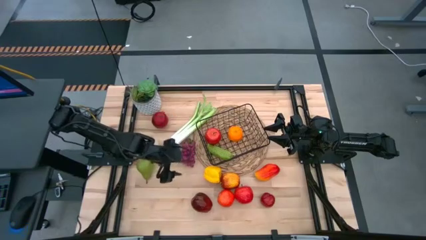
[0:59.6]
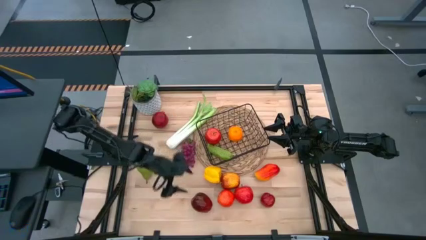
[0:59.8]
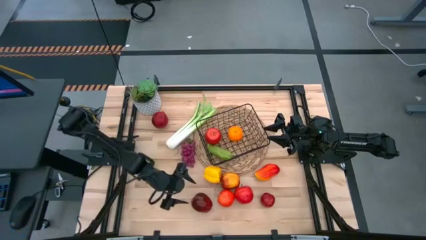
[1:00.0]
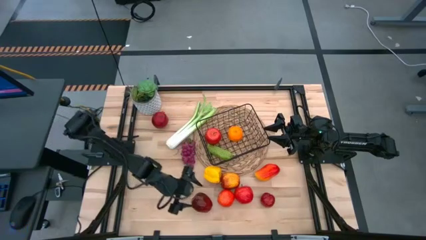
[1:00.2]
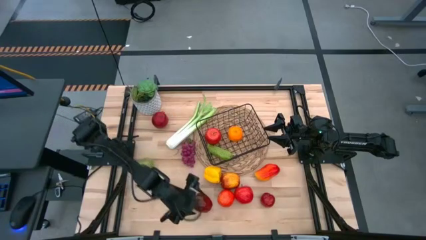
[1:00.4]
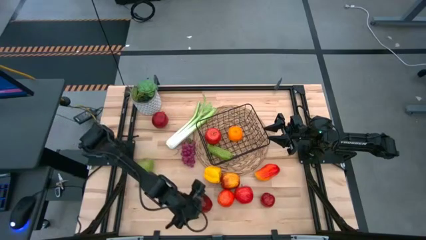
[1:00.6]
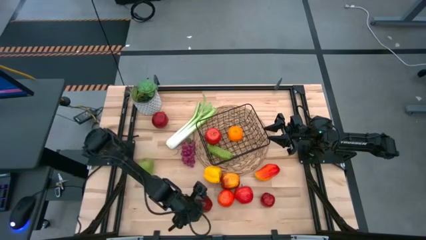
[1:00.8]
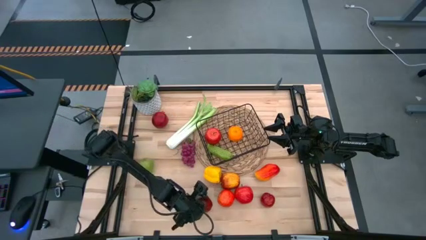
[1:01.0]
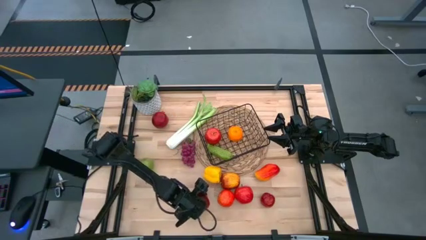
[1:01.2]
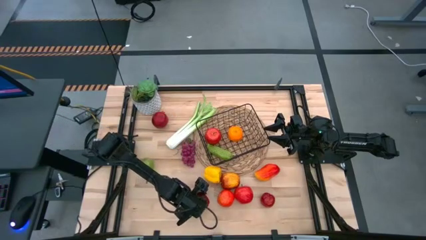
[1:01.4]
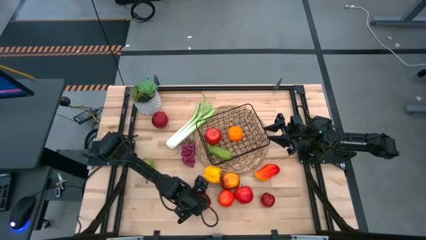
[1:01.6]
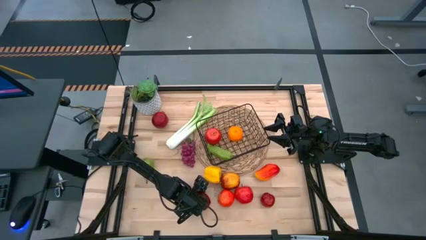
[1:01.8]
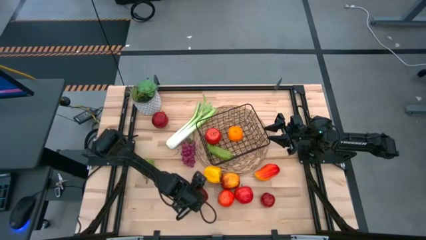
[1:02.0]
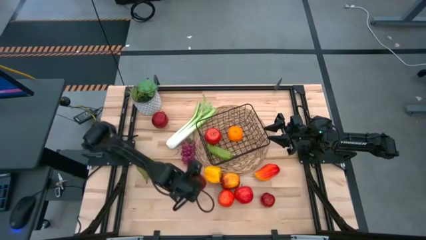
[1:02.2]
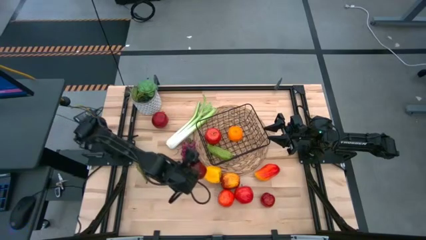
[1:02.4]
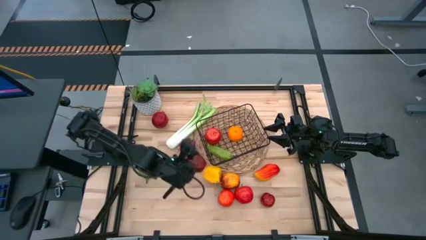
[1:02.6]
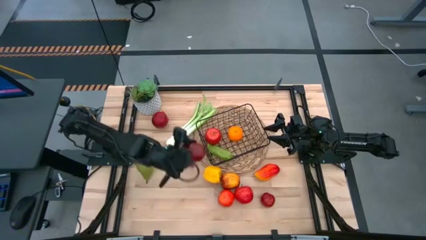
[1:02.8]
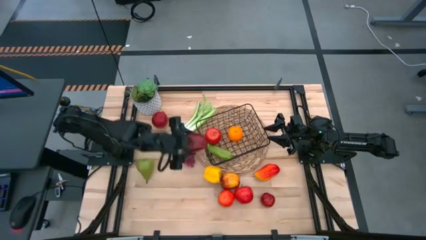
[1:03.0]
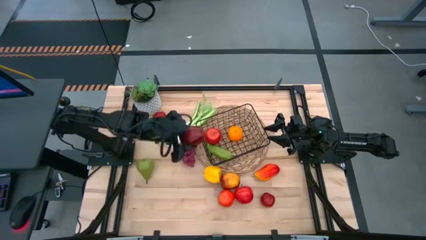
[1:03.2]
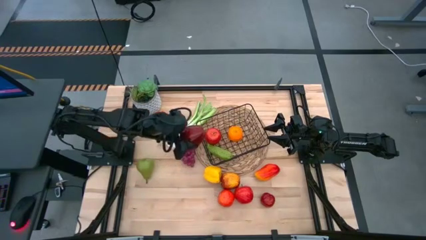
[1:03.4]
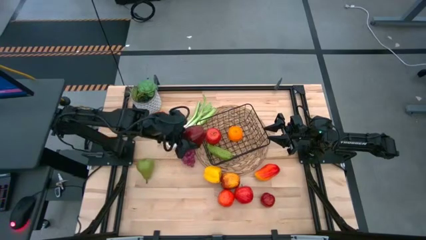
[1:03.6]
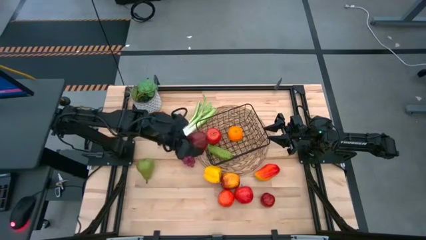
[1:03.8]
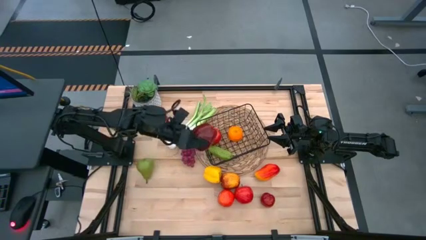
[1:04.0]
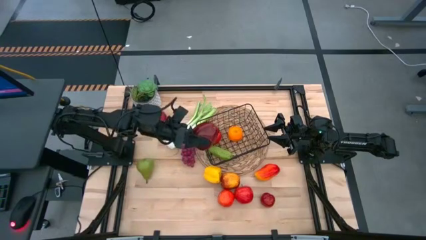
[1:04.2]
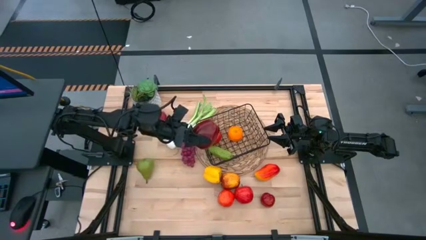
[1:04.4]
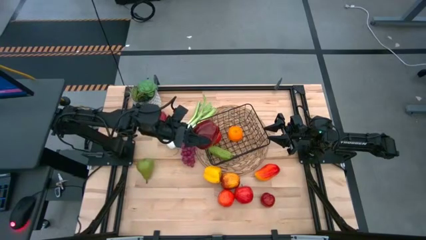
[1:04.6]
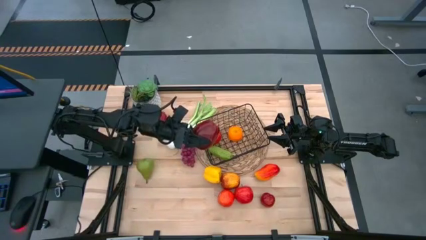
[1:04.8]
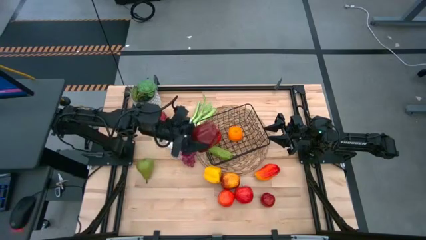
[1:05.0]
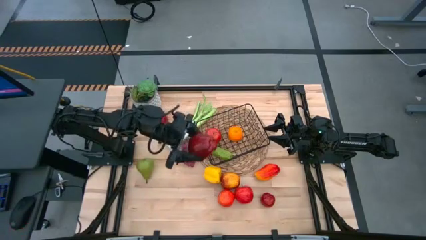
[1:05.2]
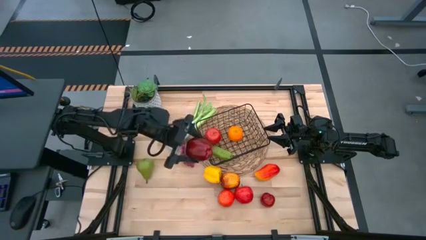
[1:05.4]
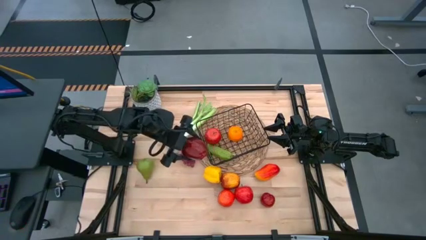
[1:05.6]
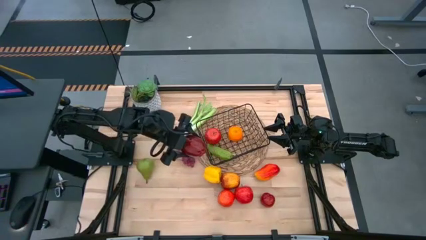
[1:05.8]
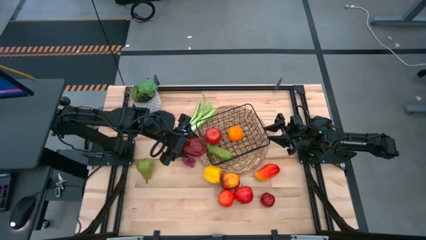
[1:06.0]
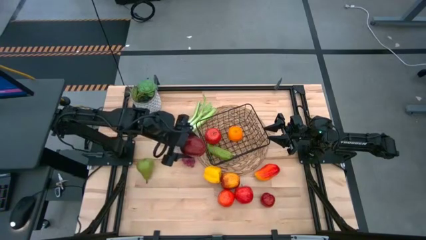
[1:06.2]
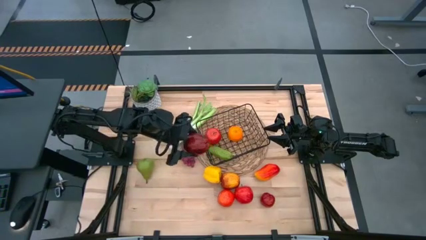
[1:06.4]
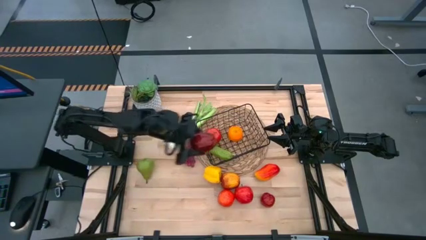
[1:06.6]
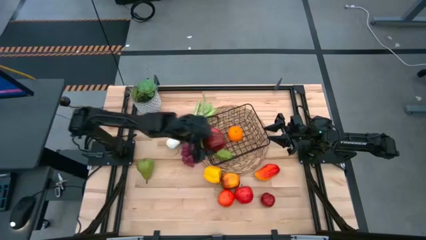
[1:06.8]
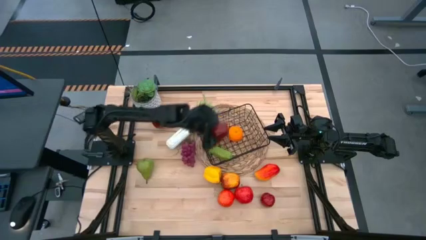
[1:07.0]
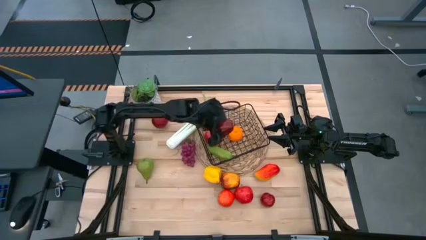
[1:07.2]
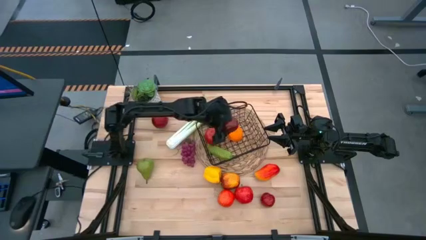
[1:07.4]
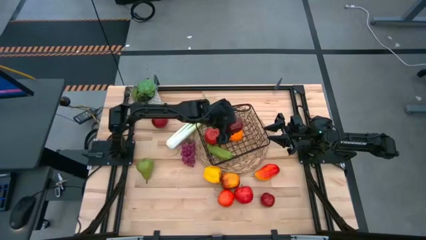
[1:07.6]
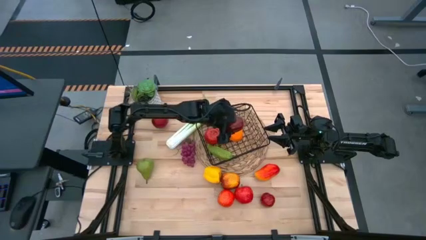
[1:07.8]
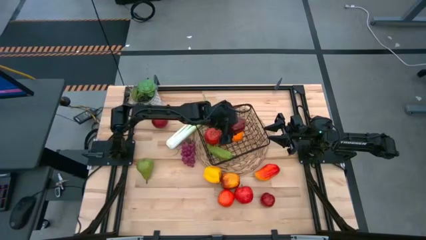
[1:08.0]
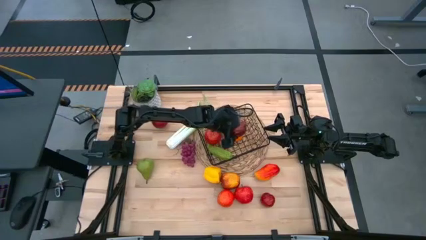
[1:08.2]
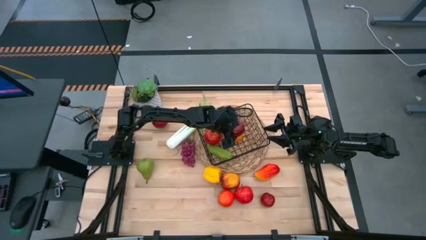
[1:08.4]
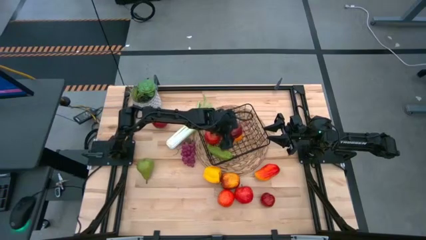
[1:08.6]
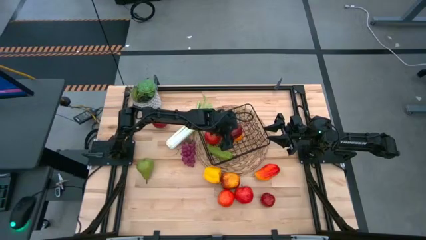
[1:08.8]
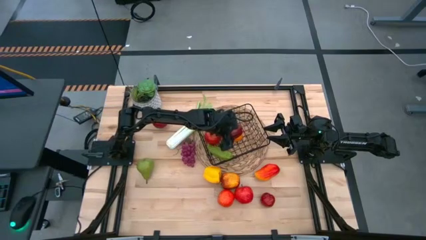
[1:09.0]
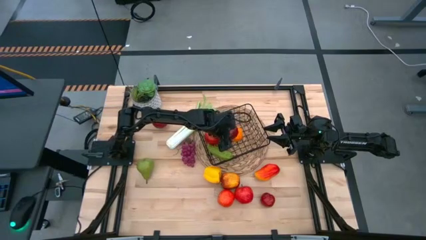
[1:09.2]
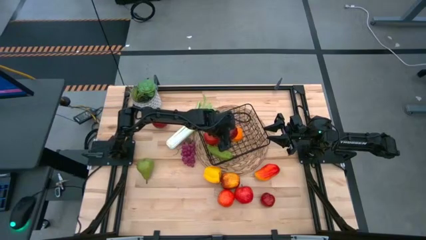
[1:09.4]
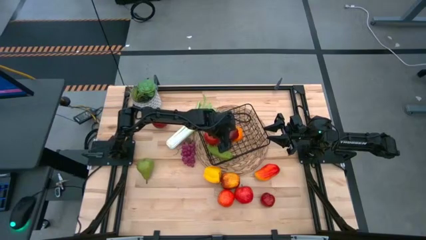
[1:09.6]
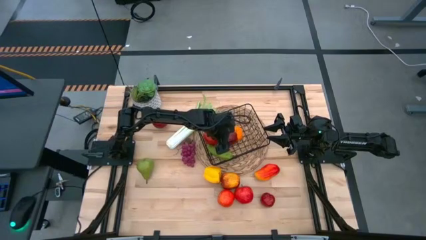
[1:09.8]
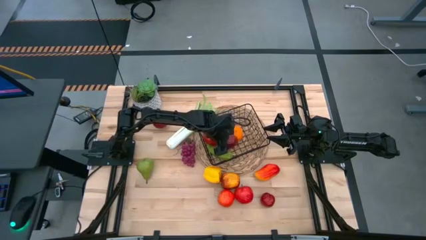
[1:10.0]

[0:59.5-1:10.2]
Task: Build produce basket
Put the red apple into the black wire basket

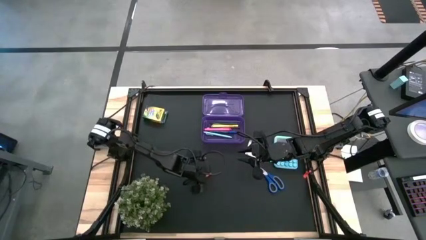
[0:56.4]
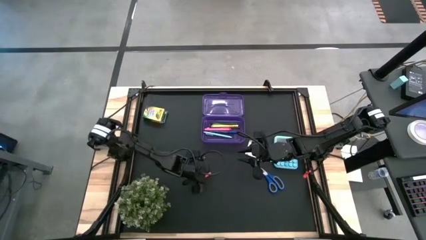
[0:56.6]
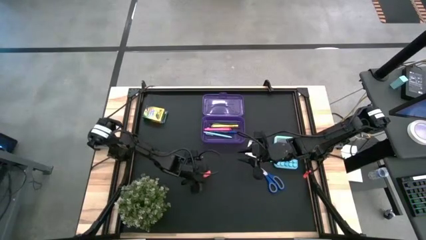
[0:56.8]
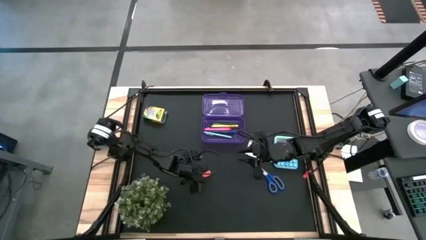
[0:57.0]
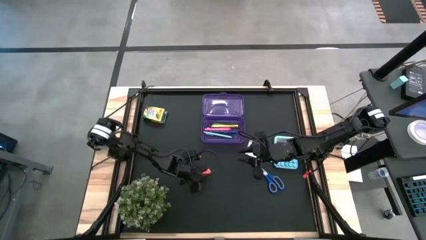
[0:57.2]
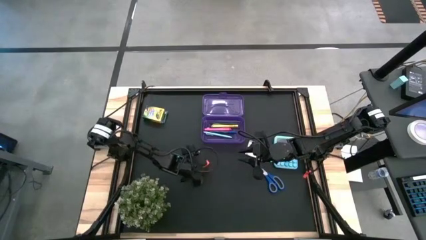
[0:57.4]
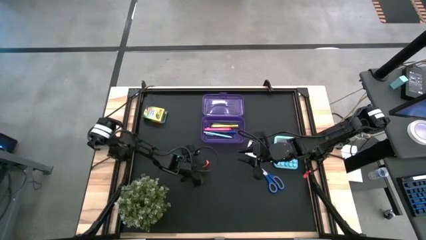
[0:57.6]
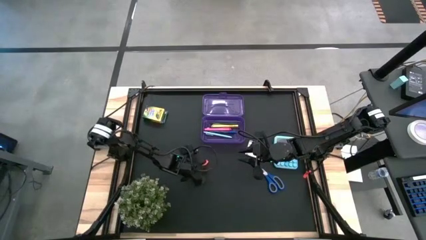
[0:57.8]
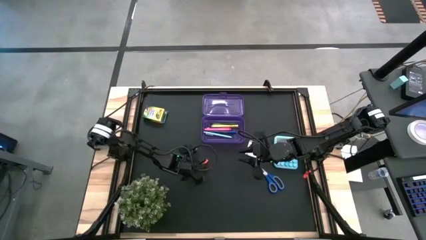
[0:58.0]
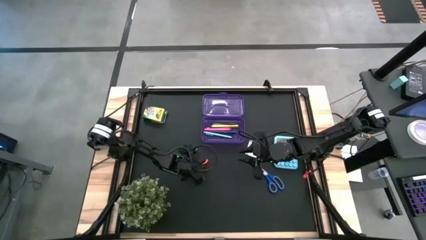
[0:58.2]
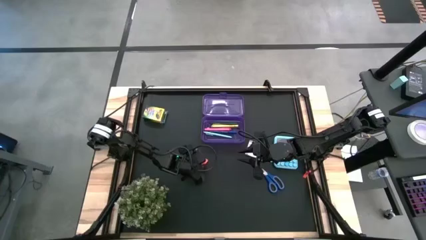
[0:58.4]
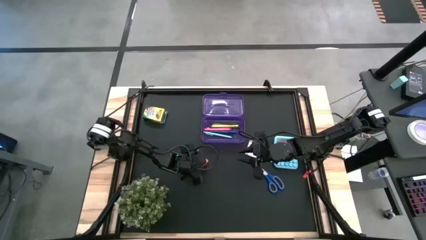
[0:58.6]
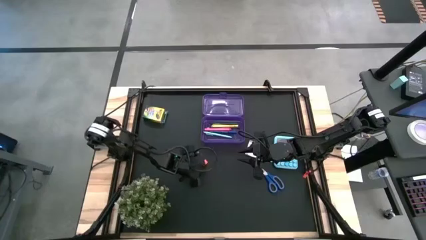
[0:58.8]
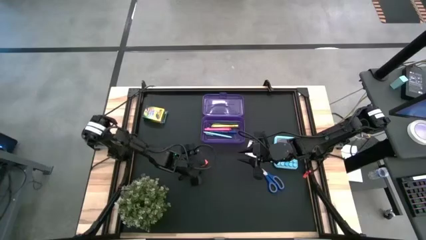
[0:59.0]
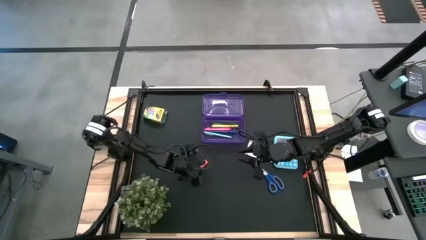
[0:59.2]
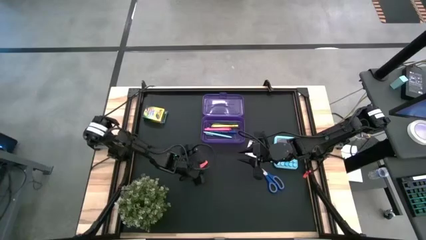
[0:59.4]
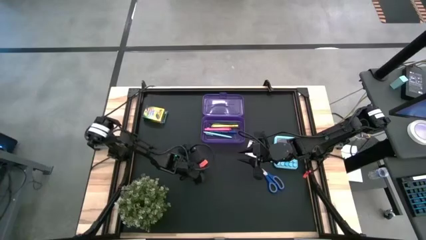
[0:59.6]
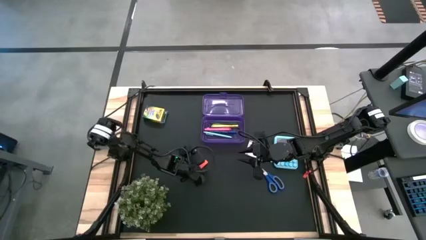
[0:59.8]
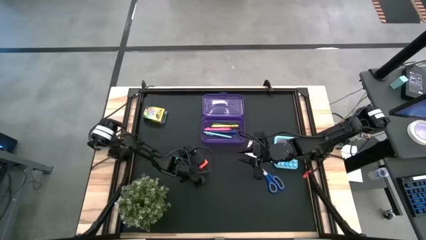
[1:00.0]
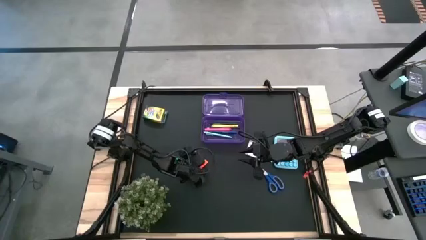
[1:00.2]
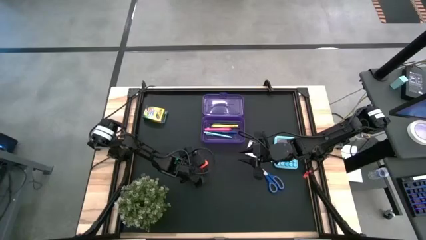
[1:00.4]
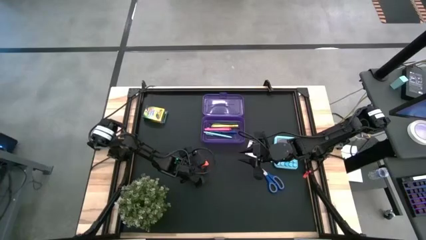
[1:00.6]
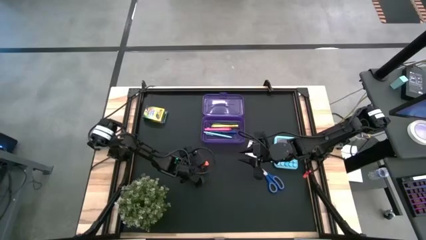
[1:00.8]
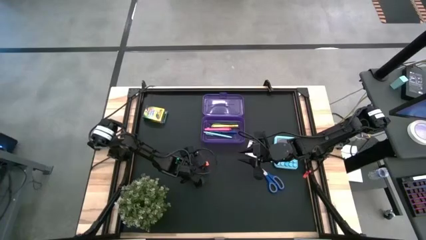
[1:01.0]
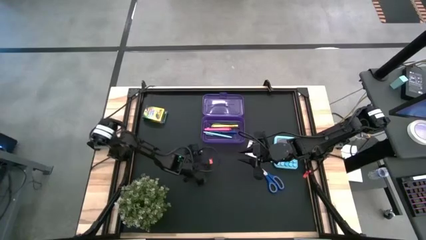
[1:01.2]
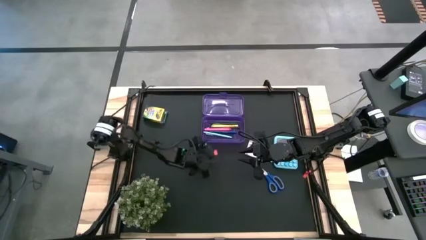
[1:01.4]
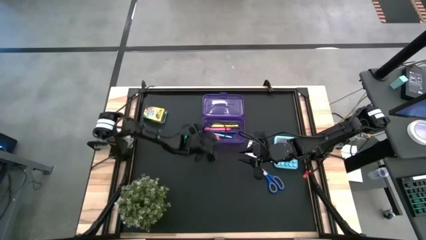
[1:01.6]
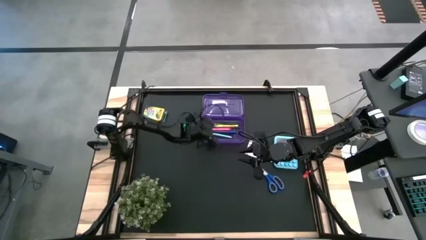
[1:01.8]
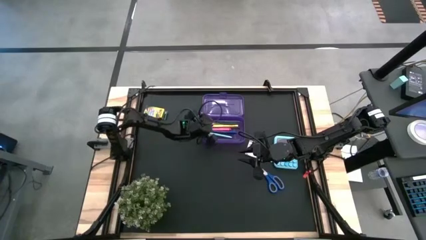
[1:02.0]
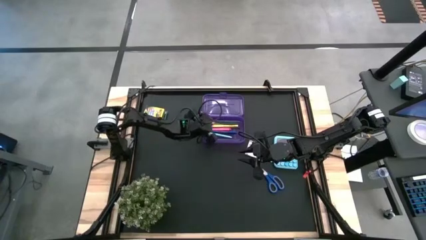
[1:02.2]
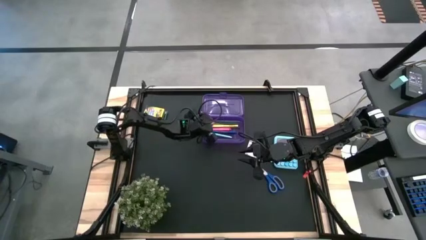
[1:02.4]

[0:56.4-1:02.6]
Task: Pack school essentials
Put the orange eraser into the purple box
